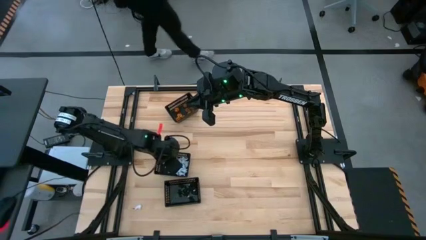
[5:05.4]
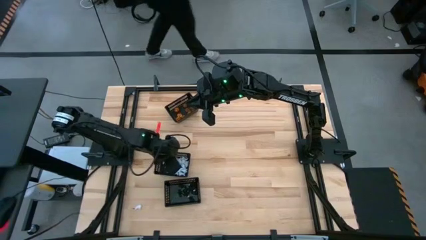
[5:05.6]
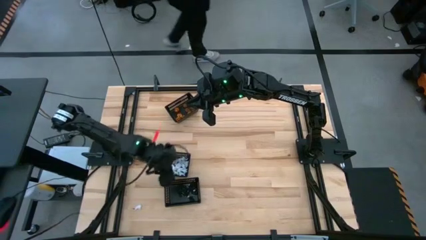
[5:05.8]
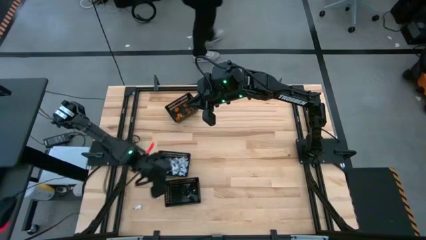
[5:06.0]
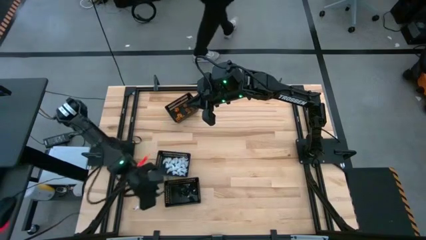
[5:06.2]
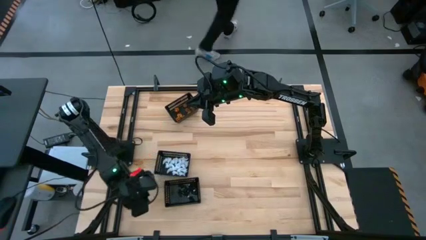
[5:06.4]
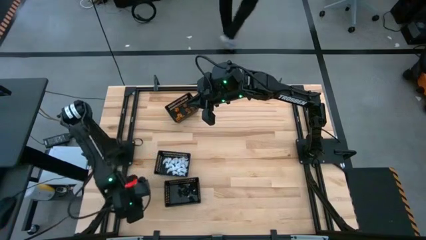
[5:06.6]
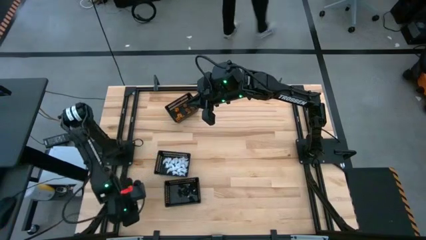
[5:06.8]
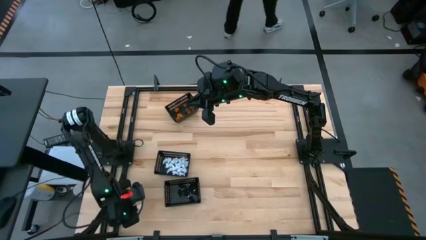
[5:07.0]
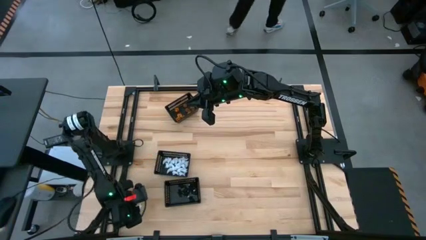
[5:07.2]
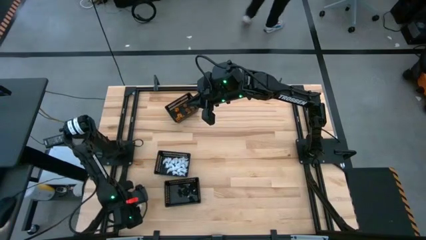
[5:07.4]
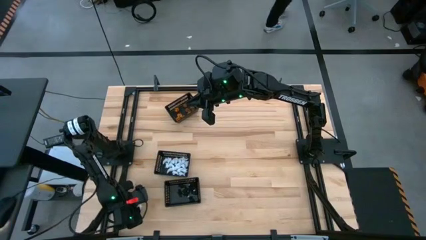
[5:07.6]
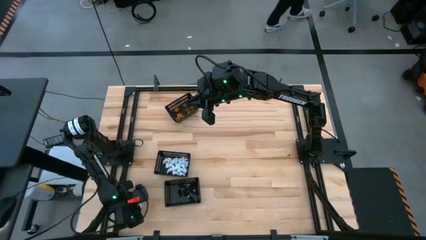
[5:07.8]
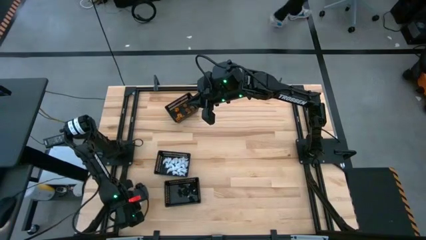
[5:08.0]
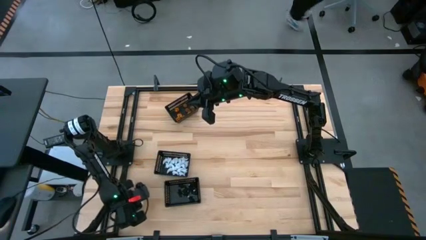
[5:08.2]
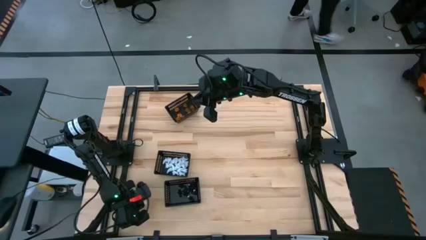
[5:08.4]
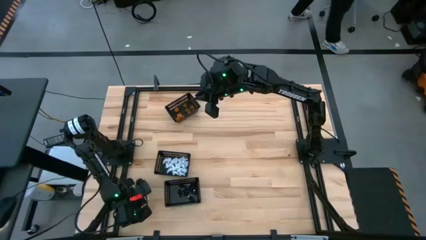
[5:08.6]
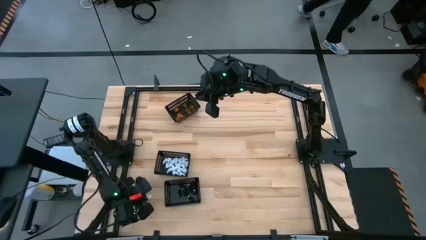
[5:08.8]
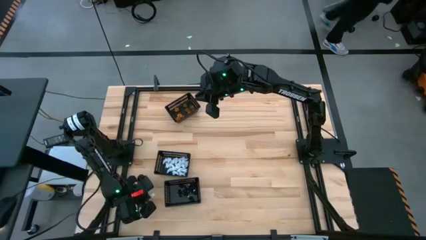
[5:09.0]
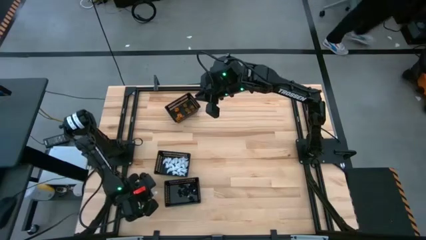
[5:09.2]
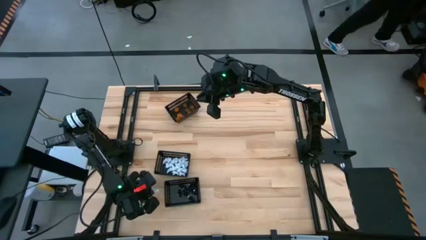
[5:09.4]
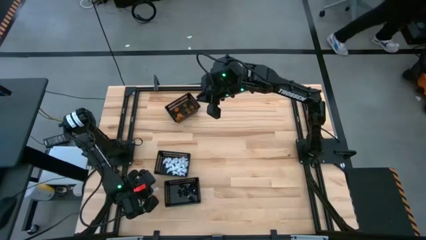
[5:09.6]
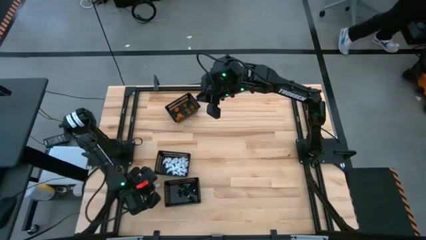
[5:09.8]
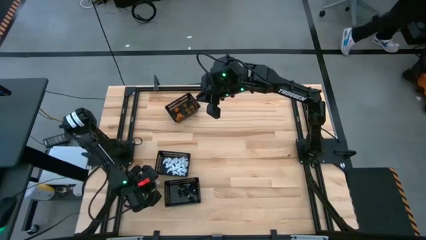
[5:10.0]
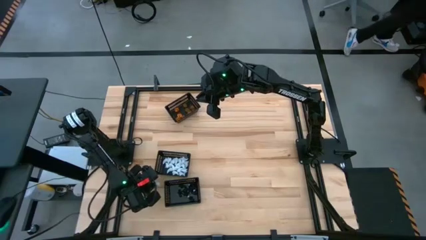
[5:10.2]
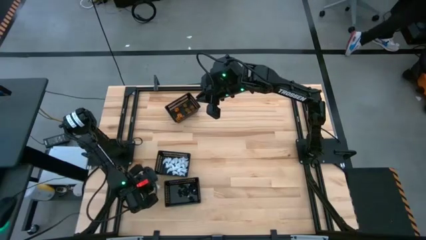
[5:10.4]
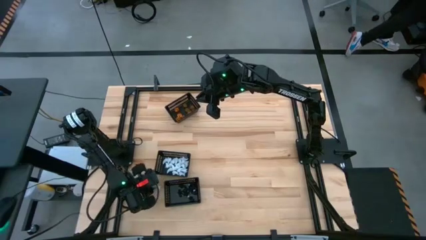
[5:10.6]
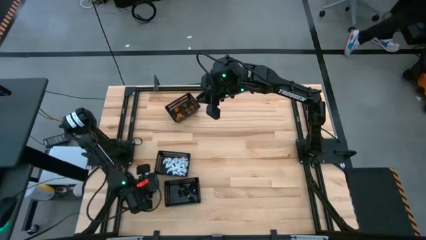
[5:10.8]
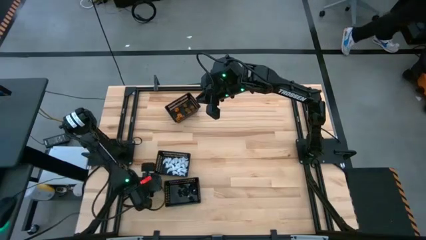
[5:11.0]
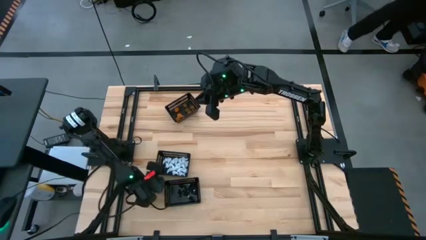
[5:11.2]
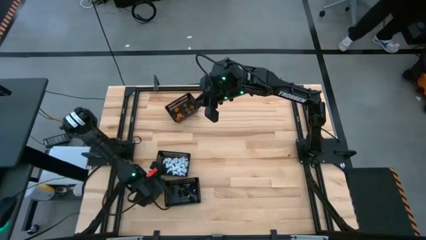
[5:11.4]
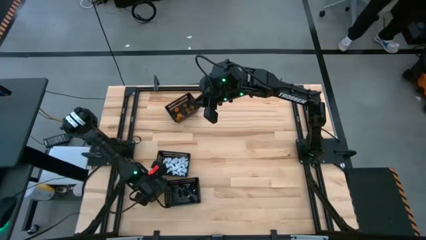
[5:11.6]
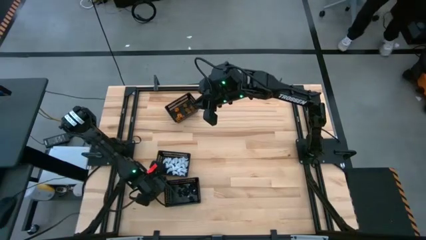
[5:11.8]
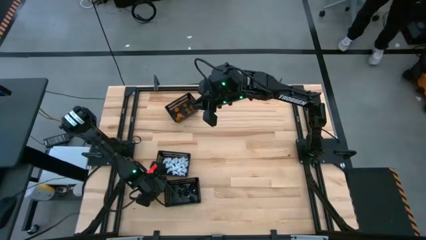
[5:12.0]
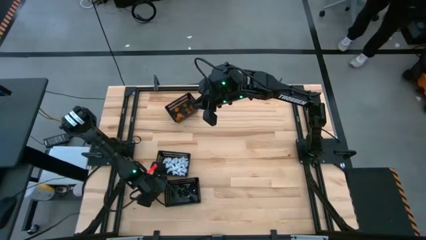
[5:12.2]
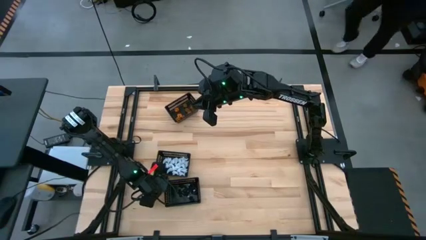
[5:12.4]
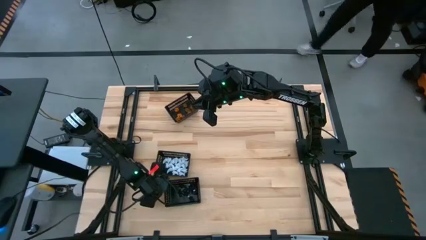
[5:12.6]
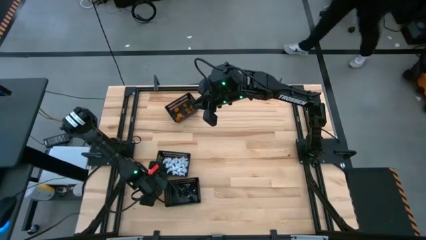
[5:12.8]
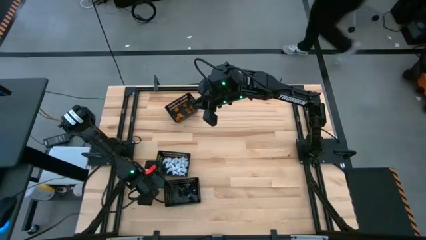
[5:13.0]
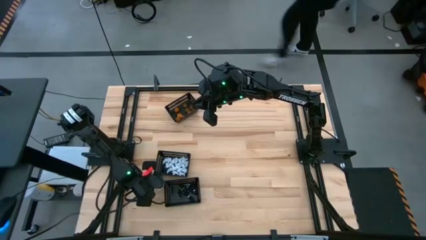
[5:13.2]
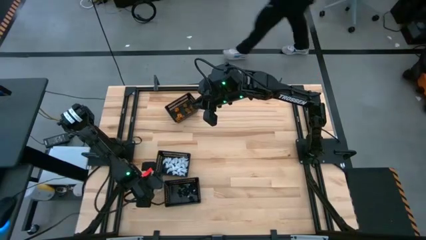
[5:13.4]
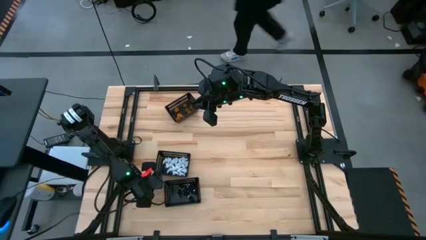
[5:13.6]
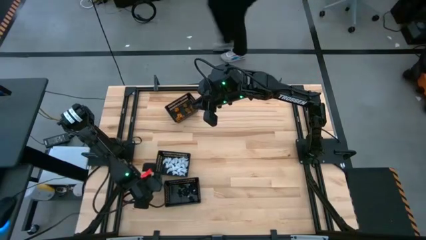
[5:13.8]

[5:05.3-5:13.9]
Task: Sort Halloween decoration
Put the white toy into the middle black bin

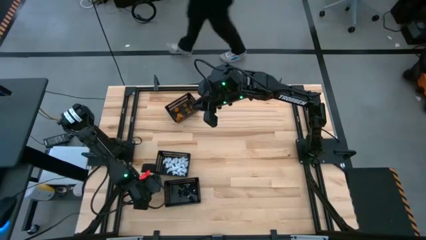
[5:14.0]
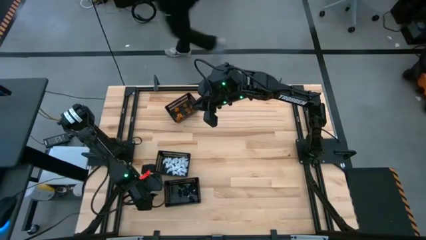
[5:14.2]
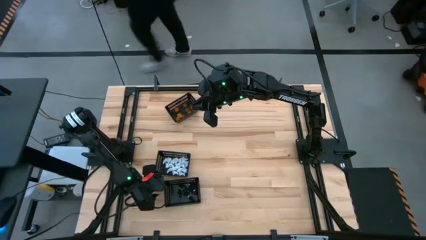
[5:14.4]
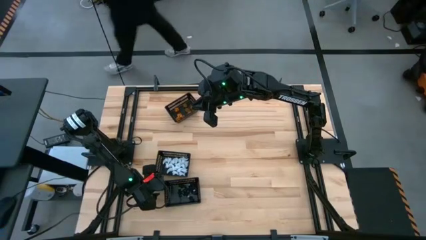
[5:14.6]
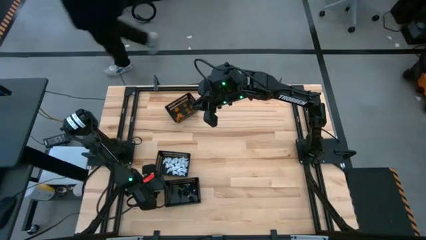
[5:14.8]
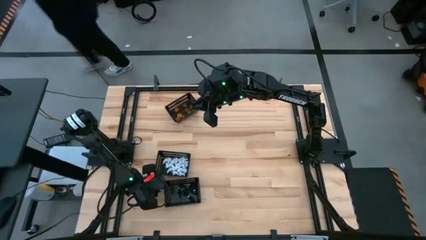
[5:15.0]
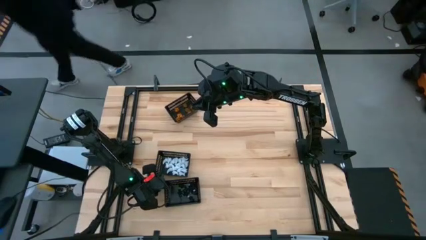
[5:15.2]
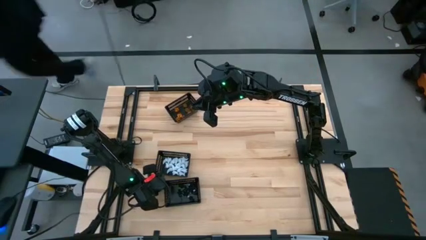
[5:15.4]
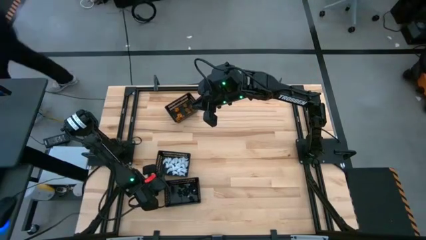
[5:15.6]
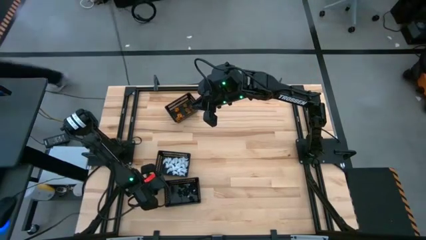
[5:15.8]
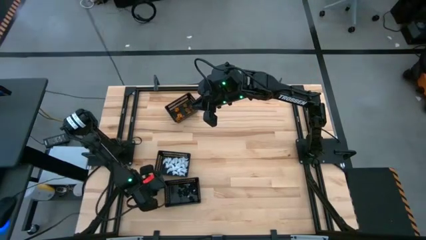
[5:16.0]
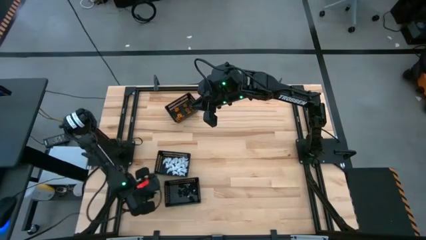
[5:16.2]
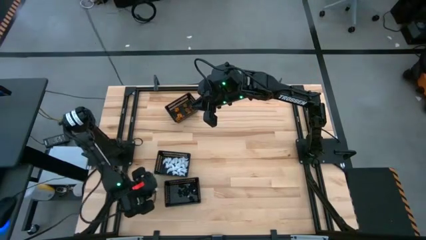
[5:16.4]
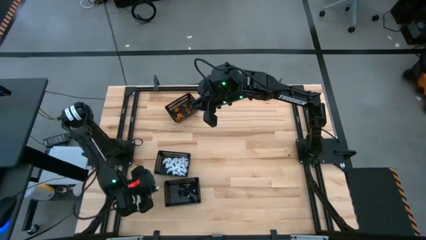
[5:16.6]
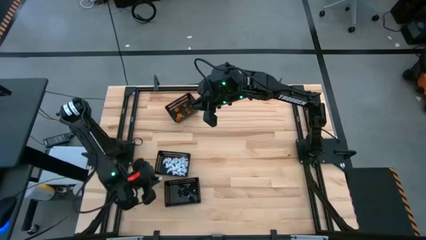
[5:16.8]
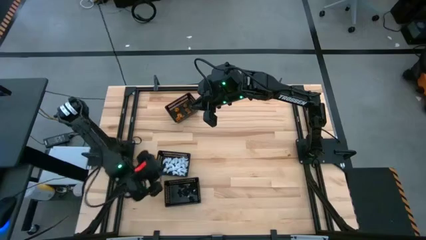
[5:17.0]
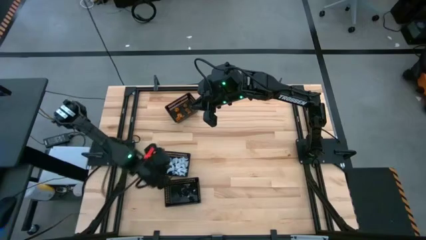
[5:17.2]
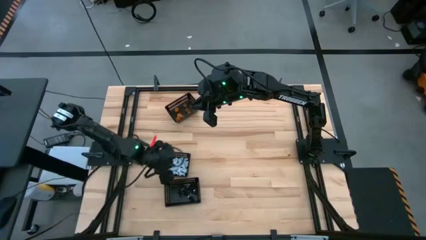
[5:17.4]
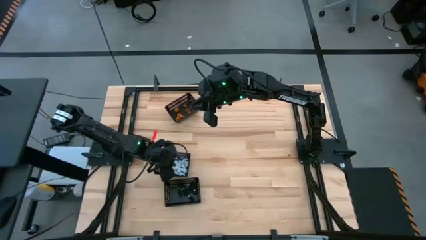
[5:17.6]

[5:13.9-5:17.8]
Put the white toy into the middle black bin

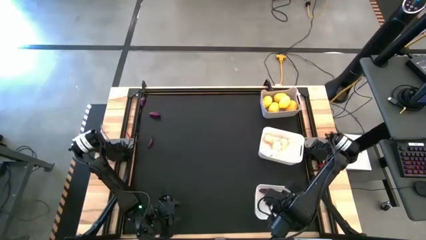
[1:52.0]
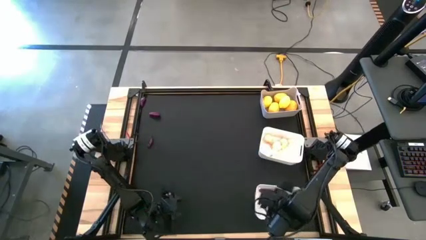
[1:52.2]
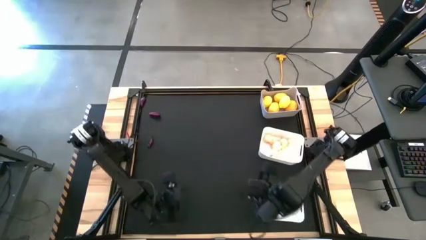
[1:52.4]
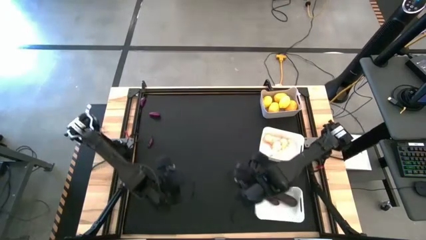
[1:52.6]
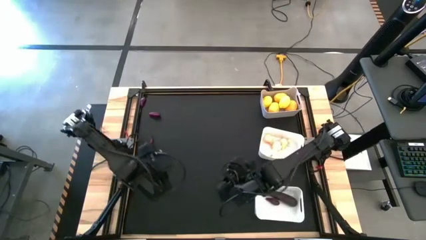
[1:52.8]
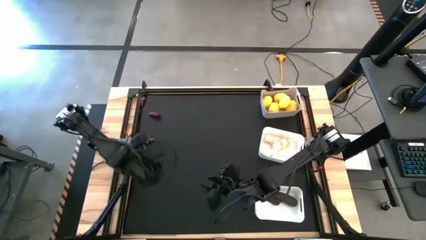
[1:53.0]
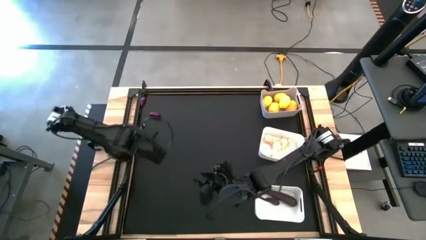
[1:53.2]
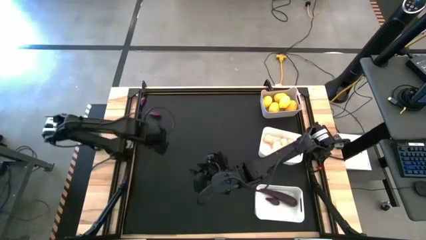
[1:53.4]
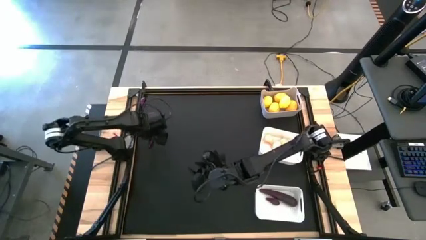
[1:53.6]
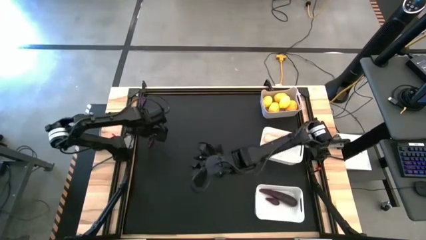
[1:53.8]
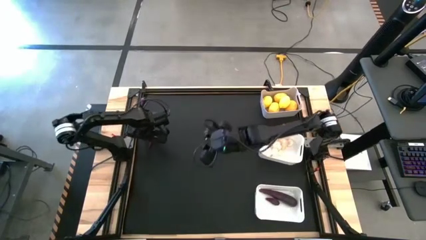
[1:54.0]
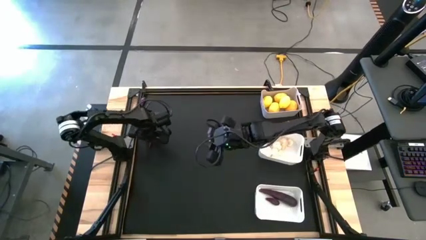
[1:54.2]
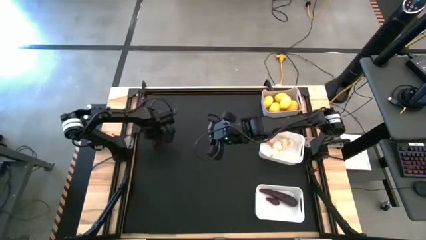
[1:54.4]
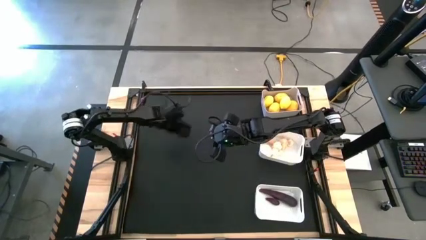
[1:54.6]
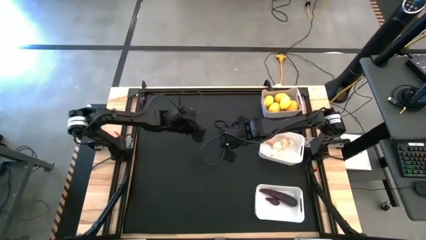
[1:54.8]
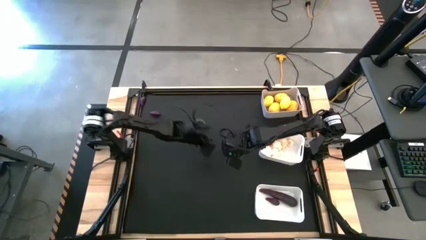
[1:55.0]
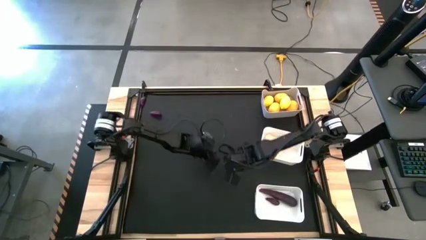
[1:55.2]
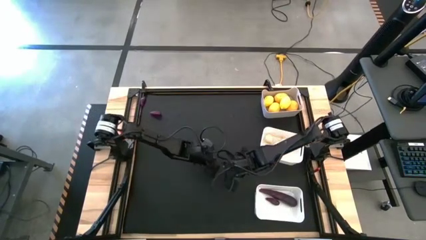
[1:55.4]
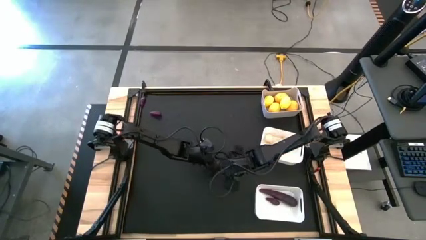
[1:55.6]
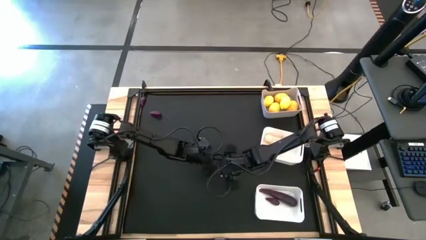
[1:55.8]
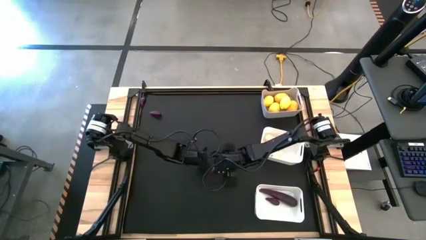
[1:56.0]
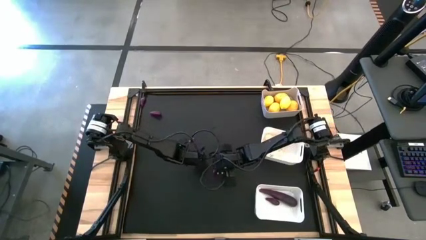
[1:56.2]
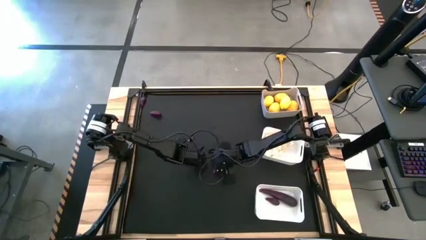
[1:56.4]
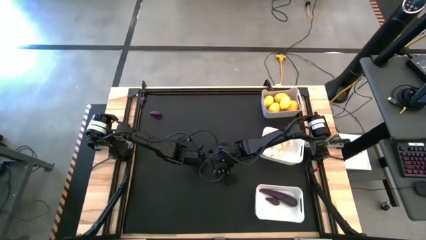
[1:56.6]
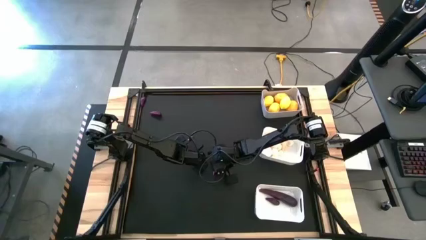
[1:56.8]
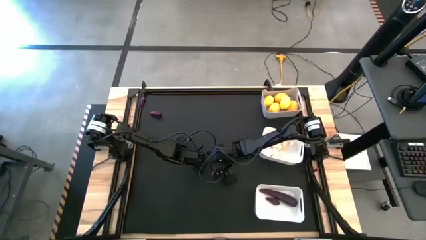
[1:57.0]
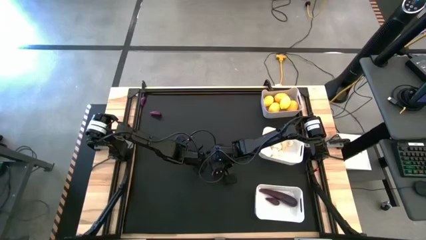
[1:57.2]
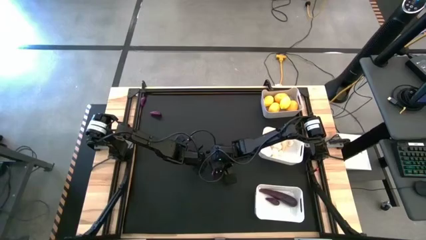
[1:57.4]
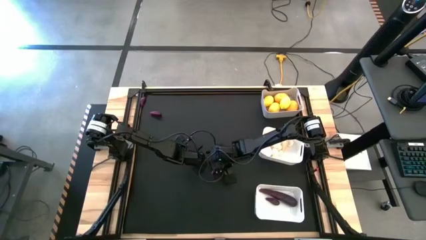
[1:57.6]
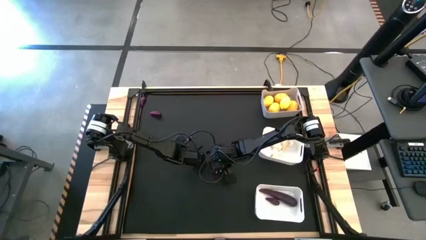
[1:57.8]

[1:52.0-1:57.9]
Task: Sort produce into baskets
Put the eggplant into the bottom white bin
